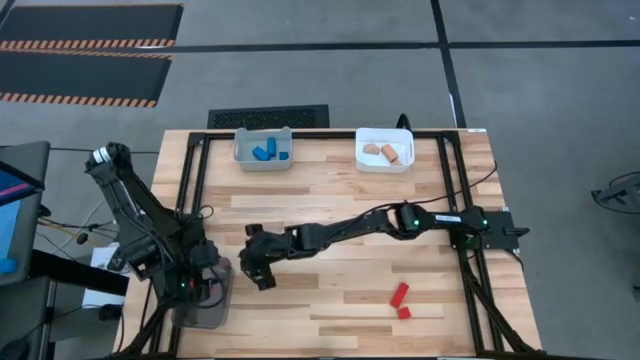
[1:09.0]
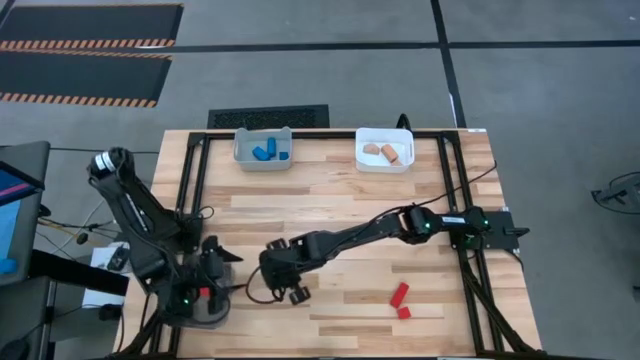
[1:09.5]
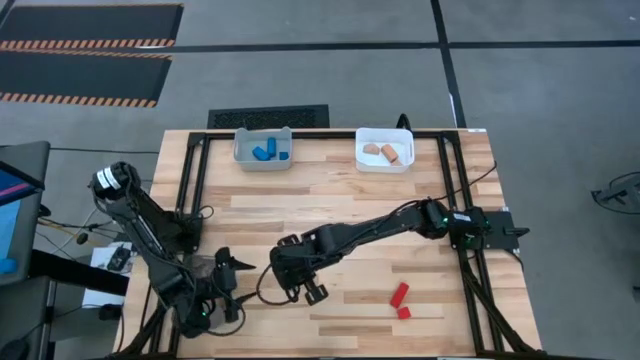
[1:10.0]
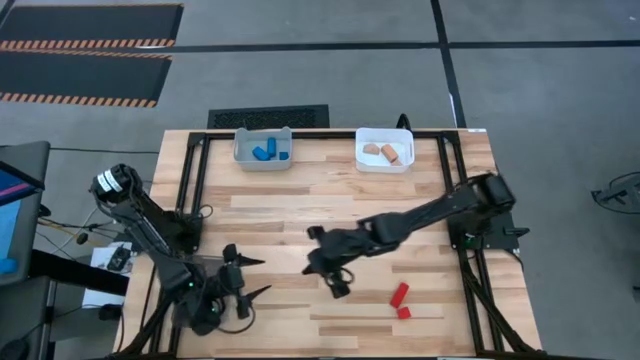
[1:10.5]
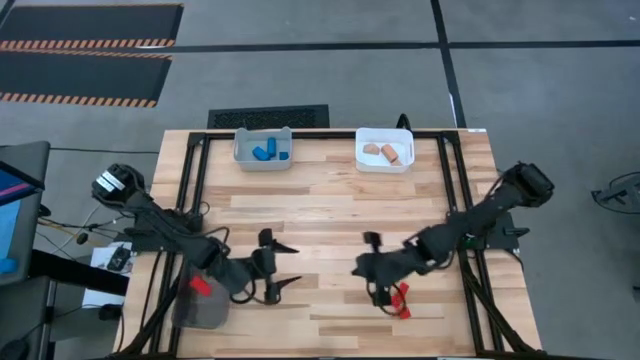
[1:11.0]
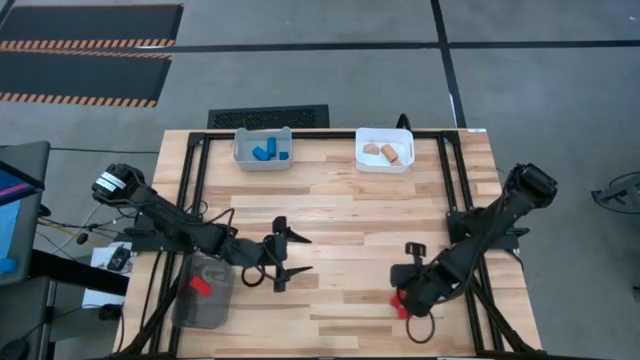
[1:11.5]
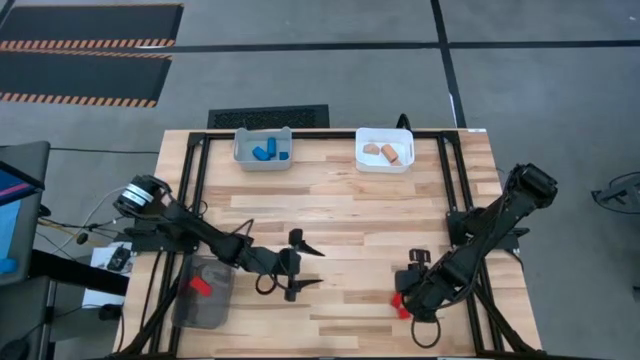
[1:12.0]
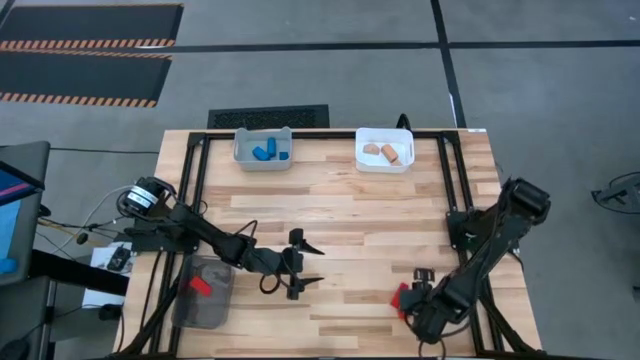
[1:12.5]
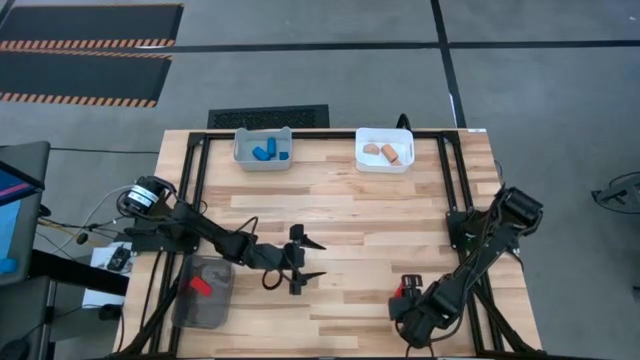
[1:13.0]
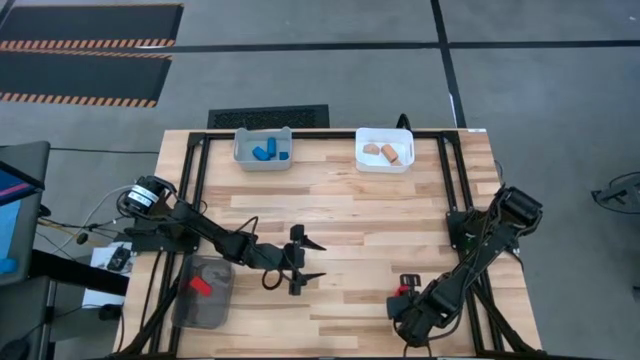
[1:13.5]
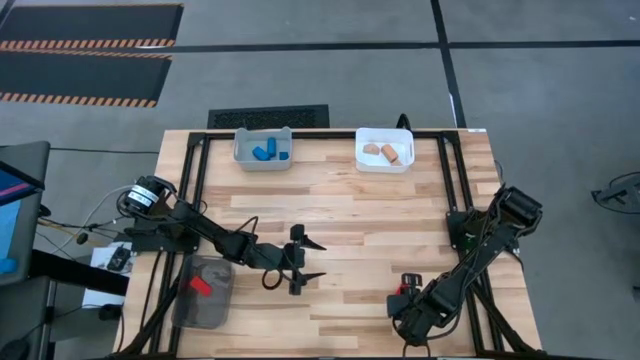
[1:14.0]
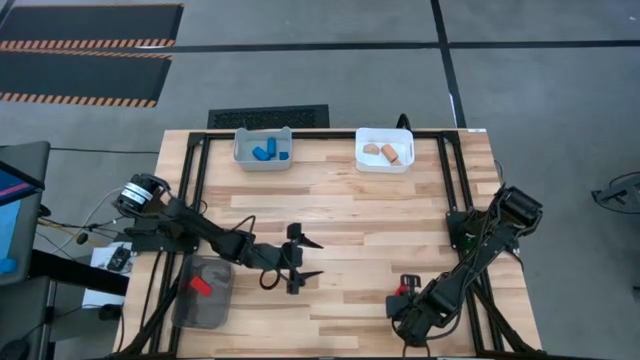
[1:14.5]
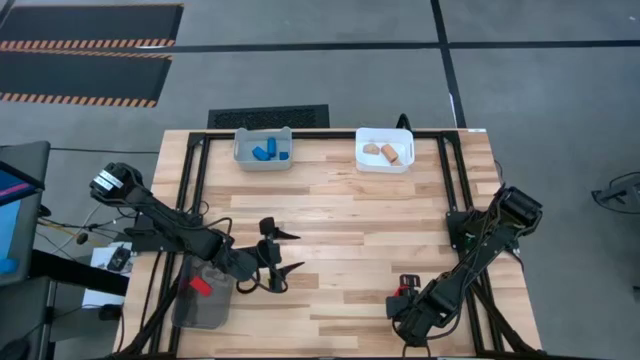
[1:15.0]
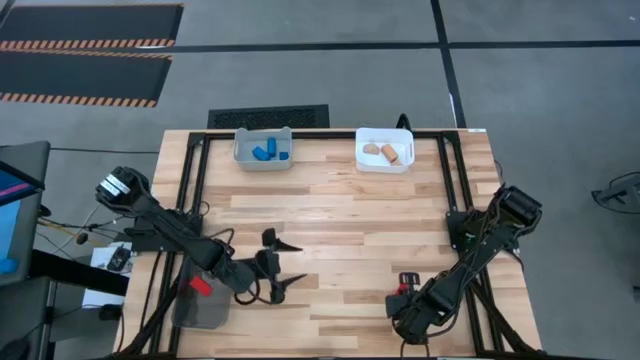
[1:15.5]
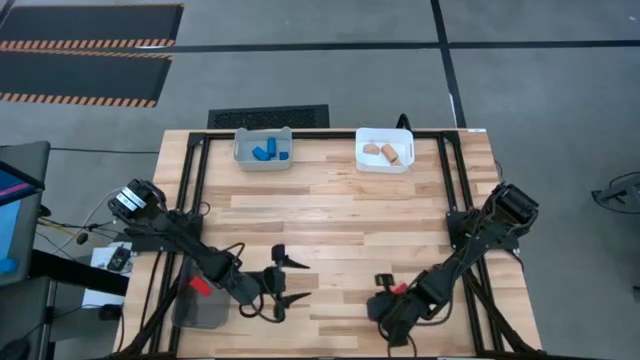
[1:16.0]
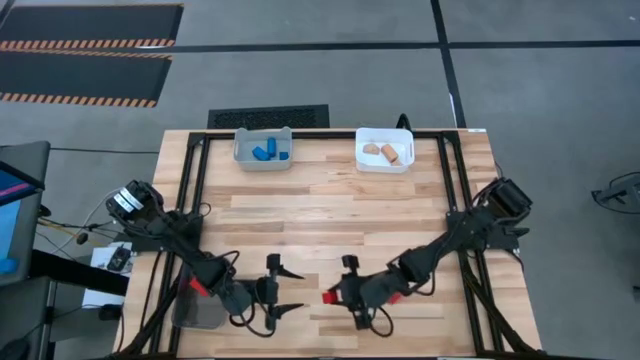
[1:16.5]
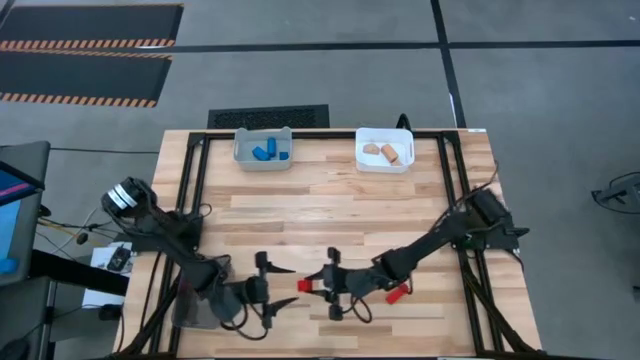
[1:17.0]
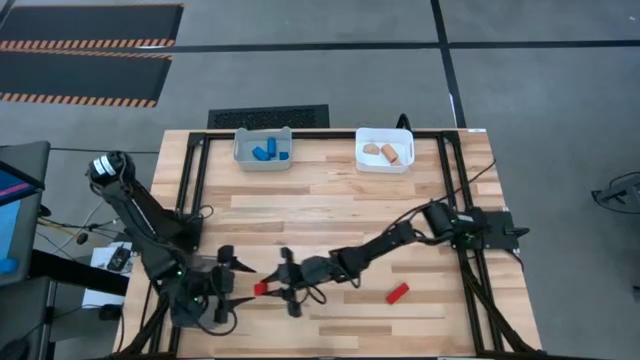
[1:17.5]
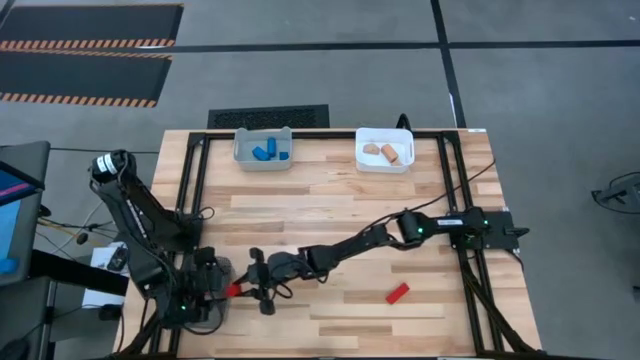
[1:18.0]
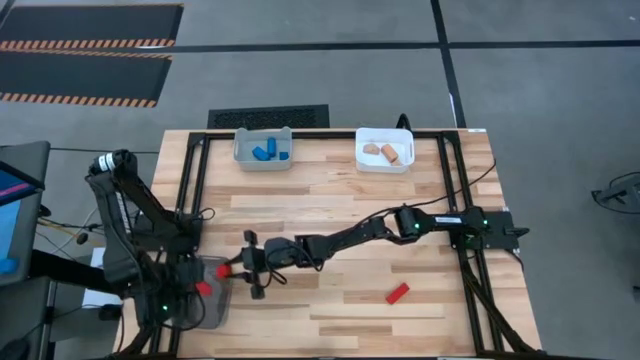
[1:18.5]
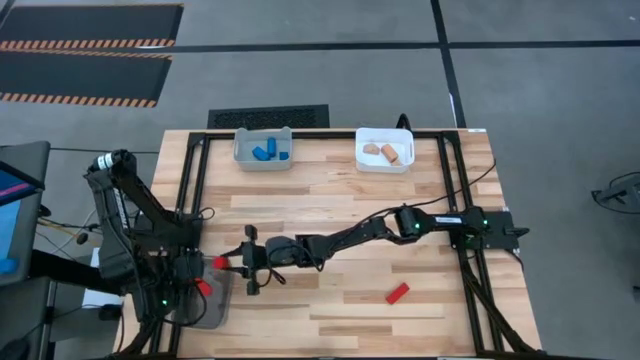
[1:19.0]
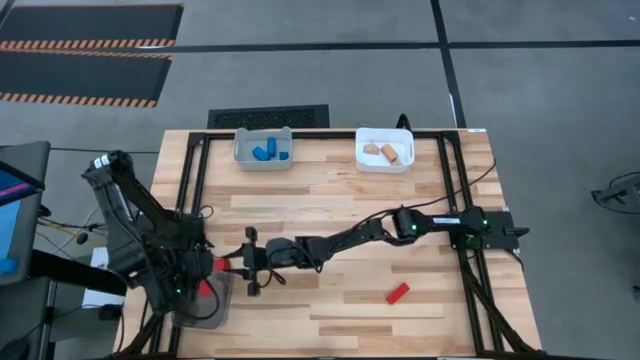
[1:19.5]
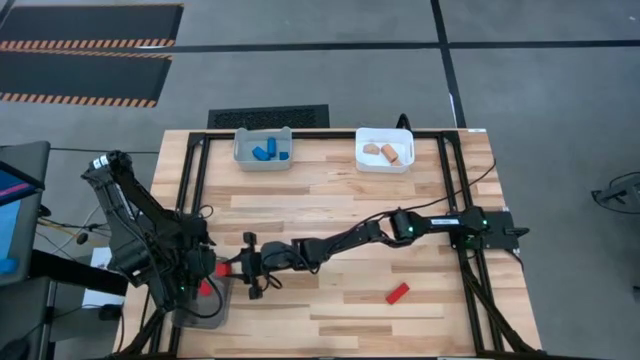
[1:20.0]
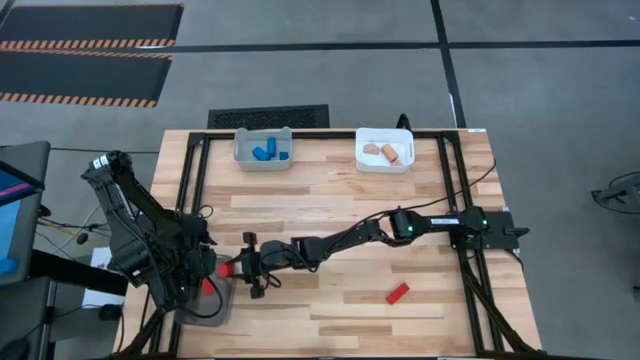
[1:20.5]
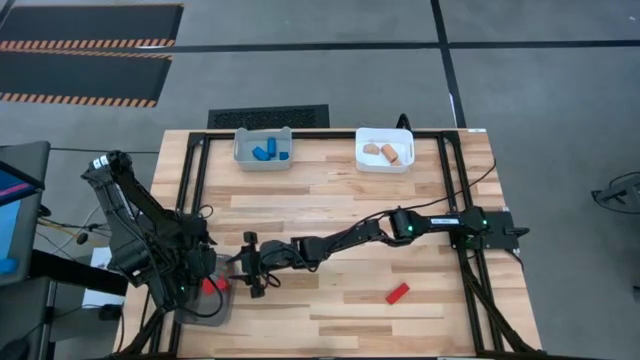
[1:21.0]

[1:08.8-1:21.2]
Task: Sort & place blocks by color
Put the red square block into the black bin

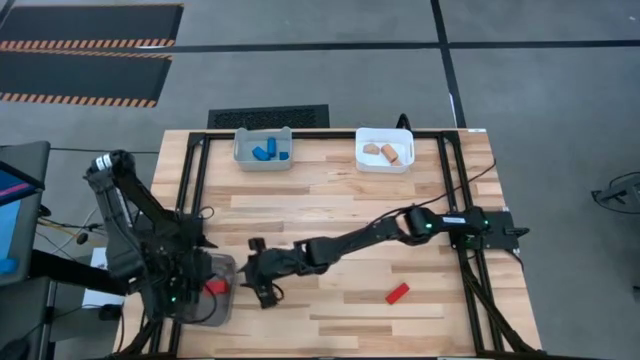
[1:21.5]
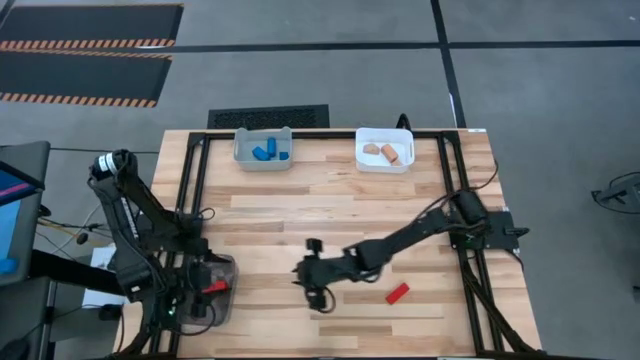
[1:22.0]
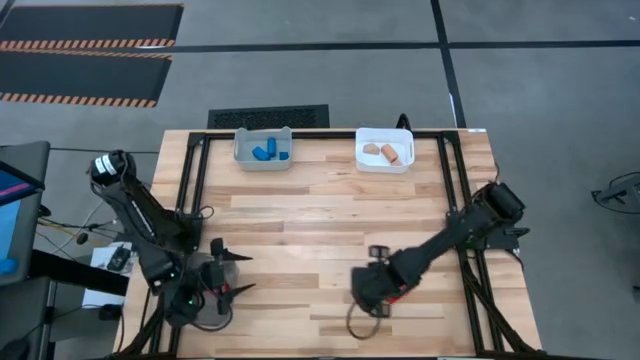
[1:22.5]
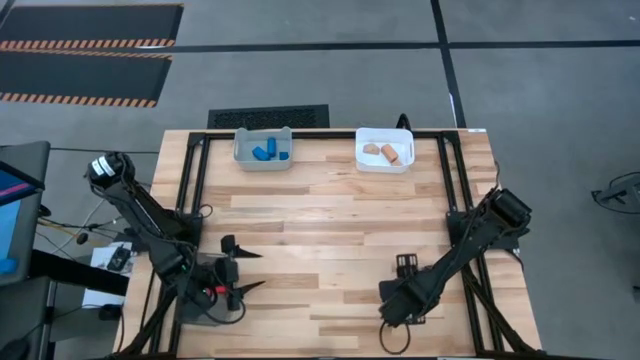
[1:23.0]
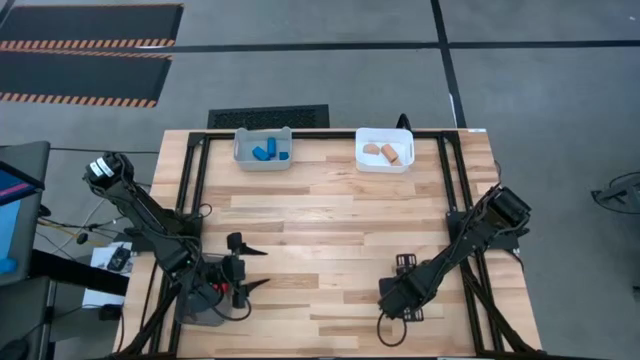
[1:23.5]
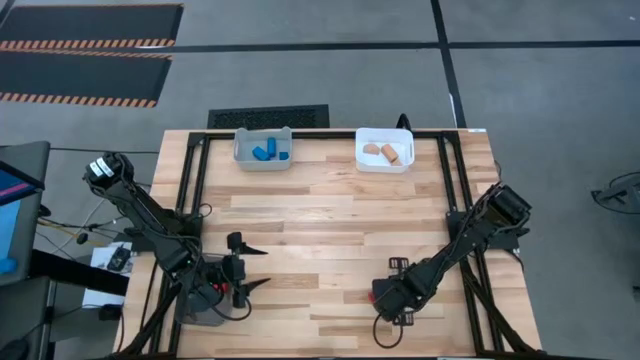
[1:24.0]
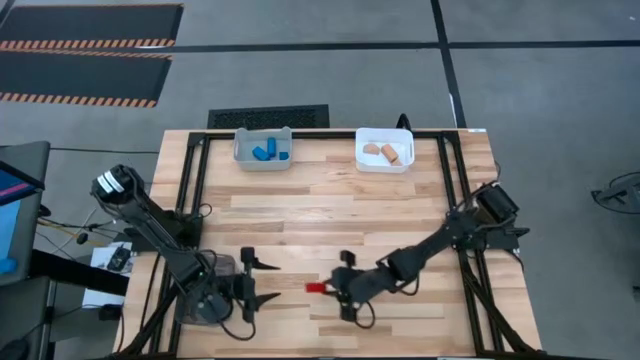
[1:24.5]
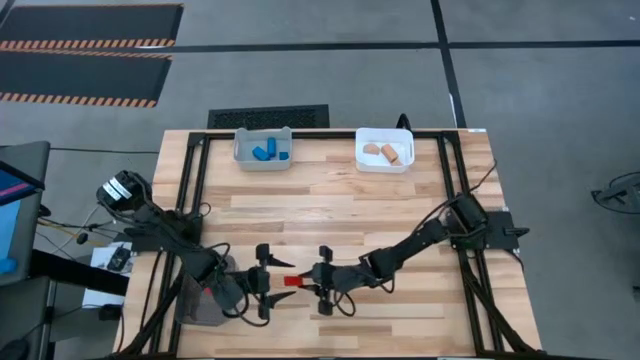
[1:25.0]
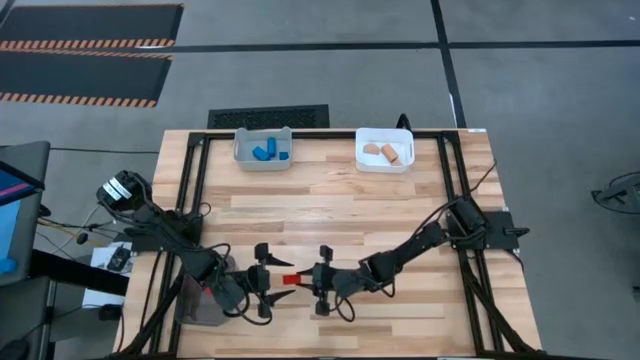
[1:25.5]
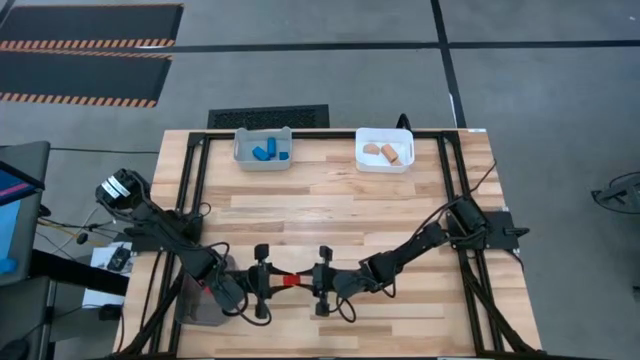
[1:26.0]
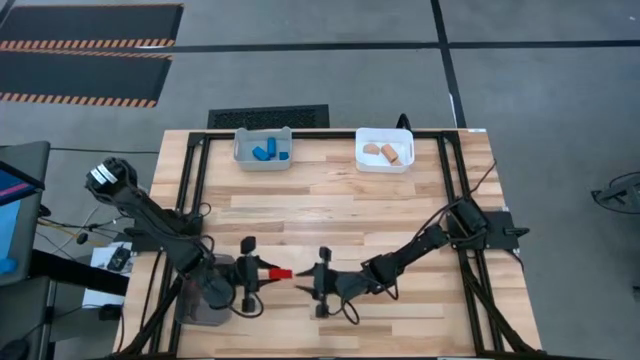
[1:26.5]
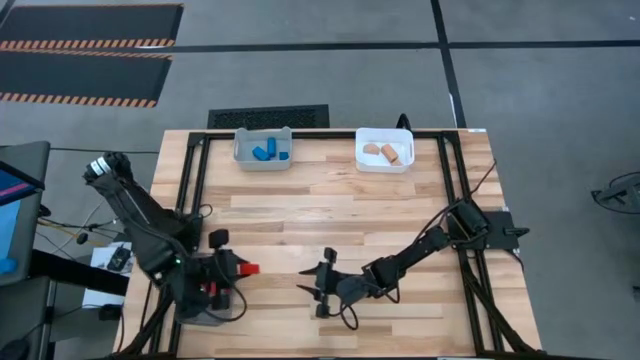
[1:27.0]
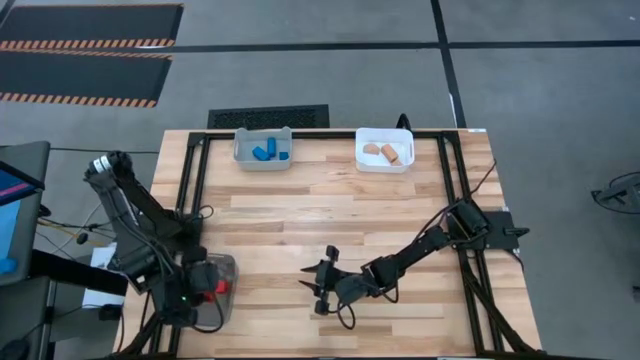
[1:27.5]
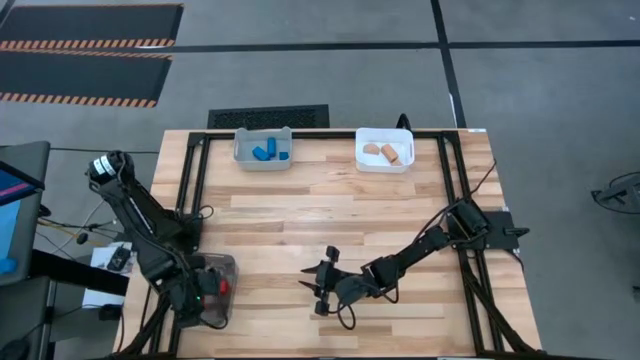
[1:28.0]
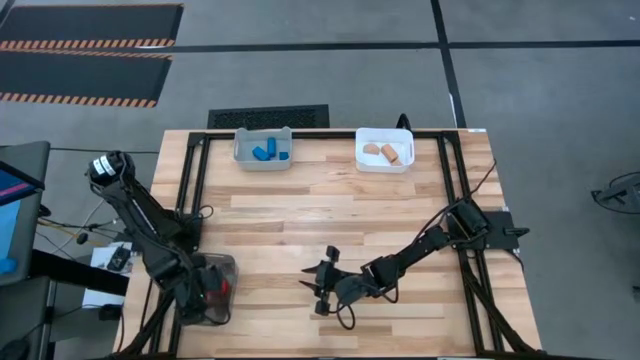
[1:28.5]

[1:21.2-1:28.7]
Put the red rectangle block into the black bin

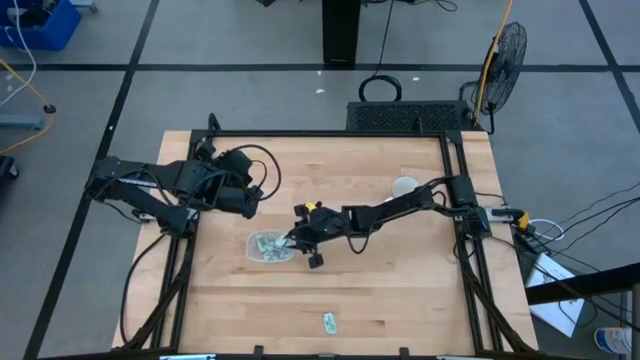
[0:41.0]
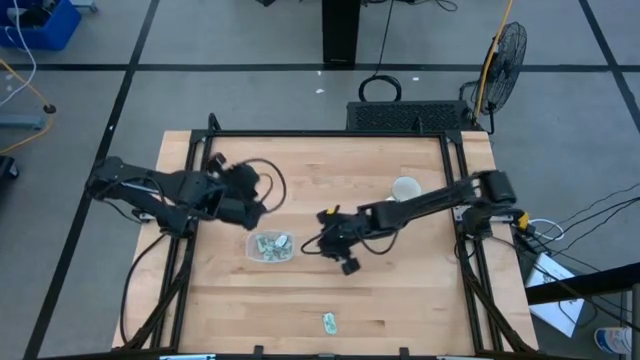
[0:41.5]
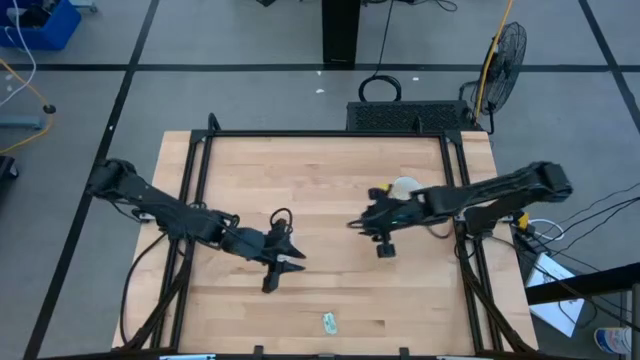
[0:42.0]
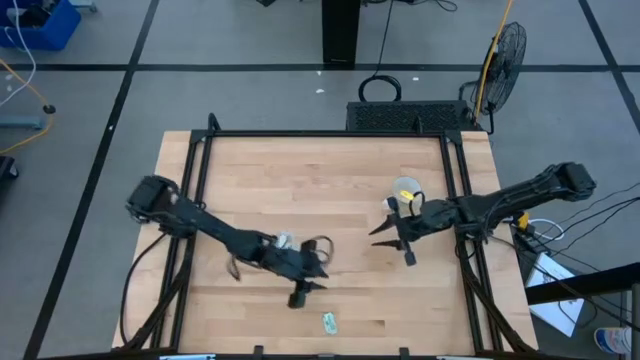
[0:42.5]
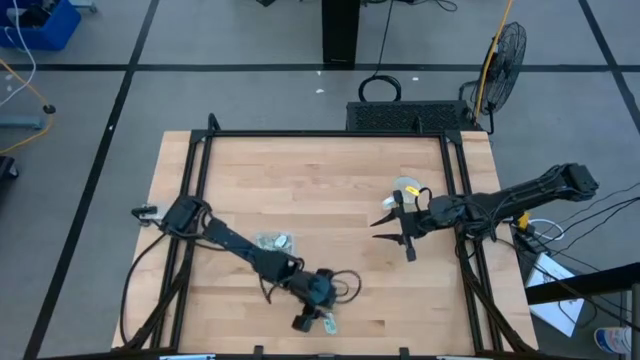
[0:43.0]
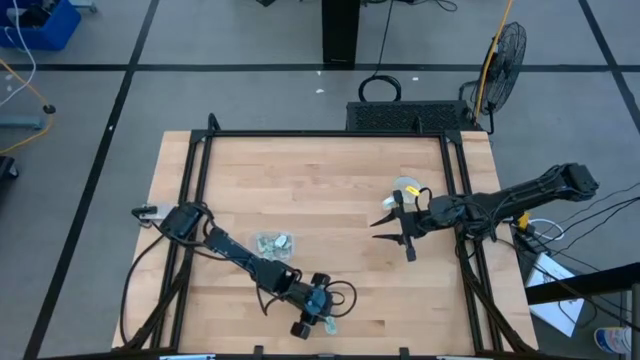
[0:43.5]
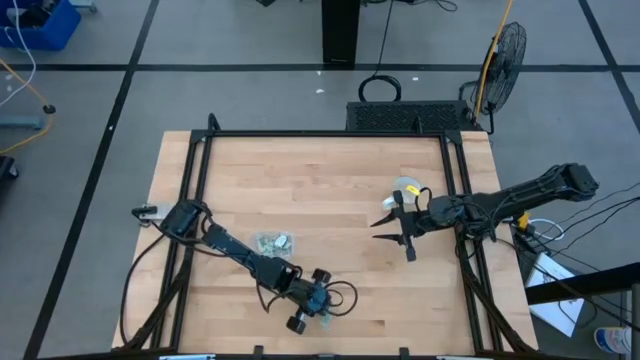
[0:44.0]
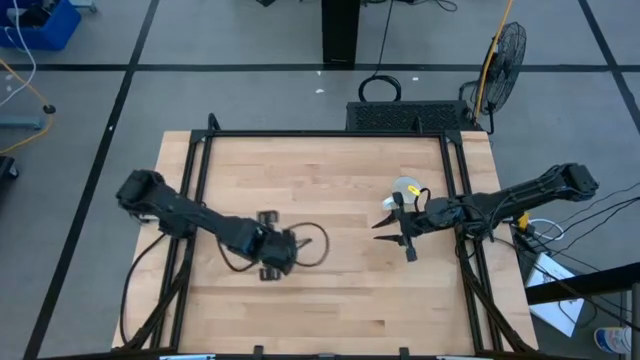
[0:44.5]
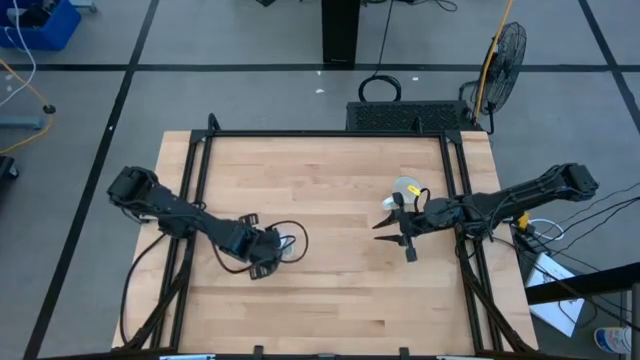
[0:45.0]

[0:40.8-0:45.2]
Task: Pick and place Stevia / Truvia into bins
Put the stevia packet into the transparent bin
